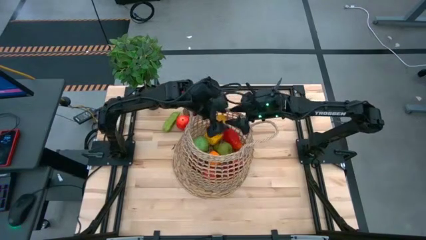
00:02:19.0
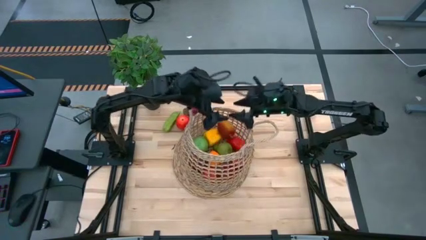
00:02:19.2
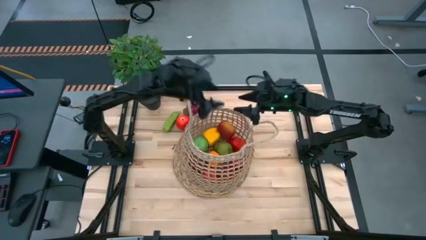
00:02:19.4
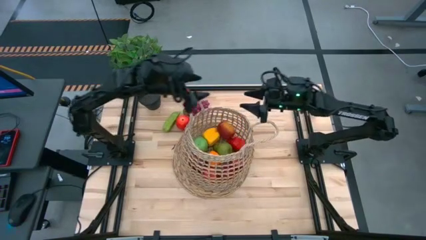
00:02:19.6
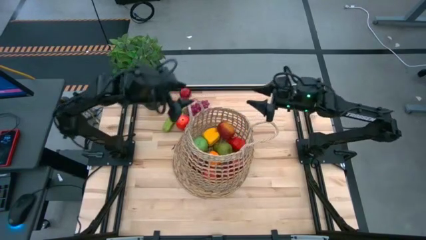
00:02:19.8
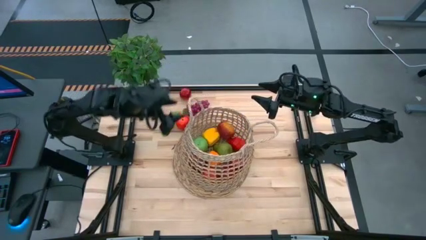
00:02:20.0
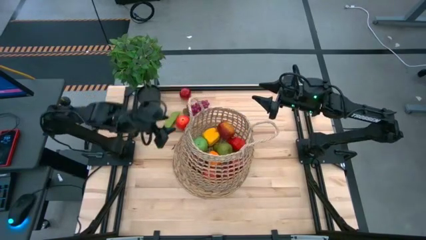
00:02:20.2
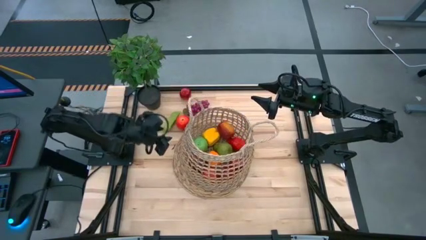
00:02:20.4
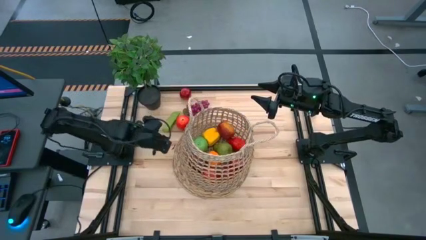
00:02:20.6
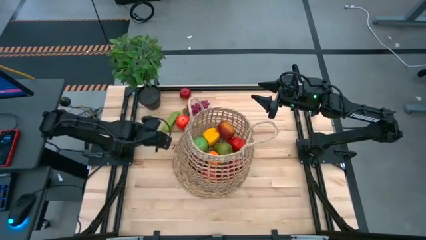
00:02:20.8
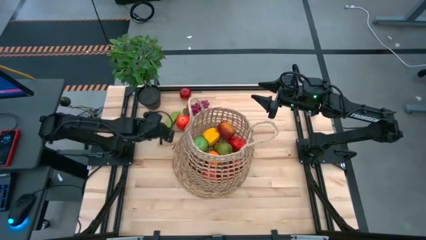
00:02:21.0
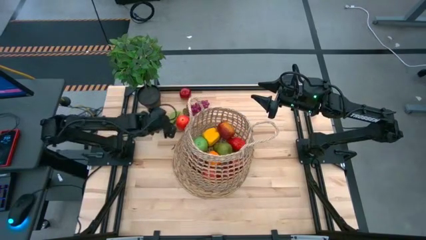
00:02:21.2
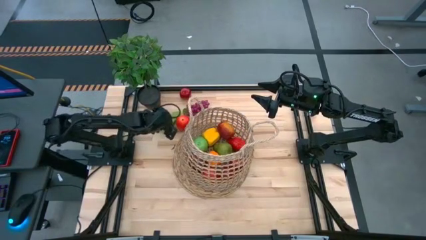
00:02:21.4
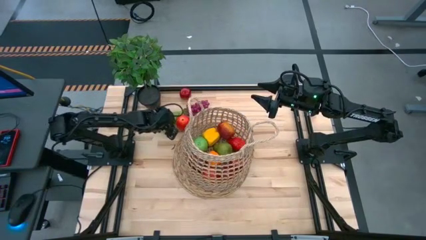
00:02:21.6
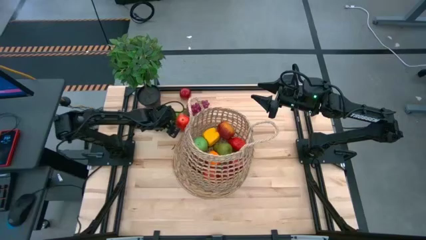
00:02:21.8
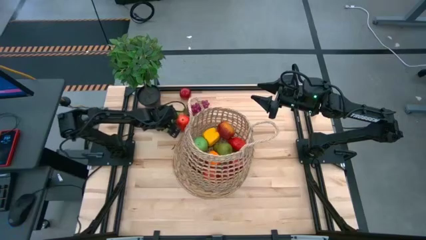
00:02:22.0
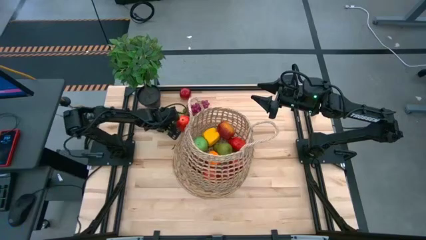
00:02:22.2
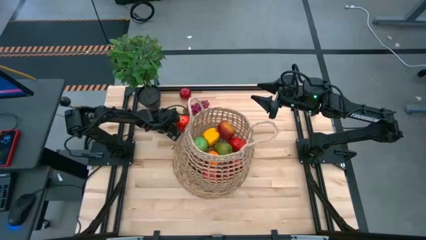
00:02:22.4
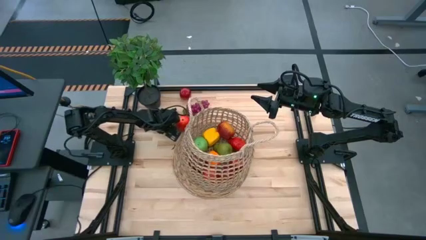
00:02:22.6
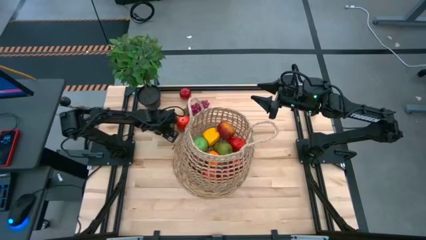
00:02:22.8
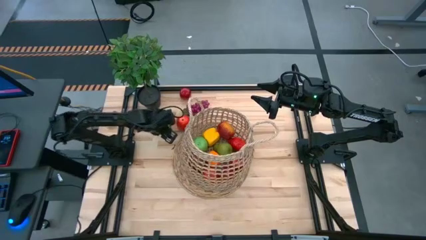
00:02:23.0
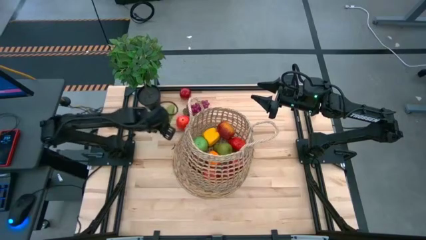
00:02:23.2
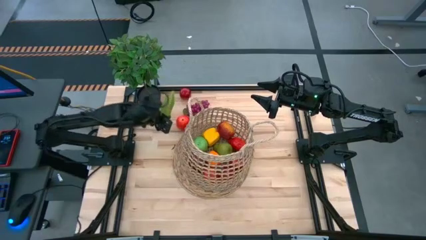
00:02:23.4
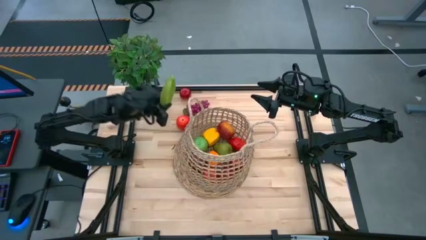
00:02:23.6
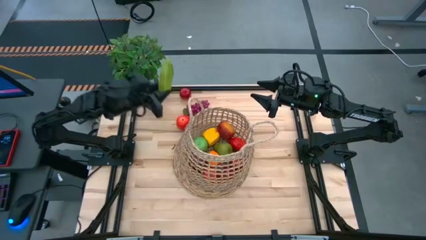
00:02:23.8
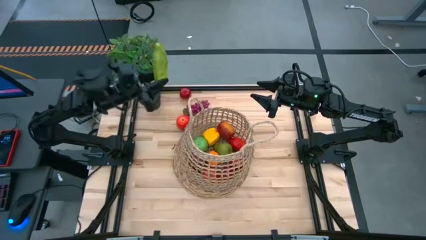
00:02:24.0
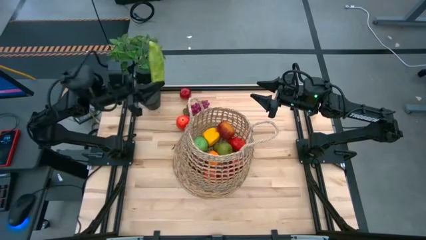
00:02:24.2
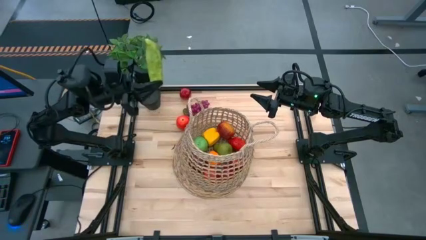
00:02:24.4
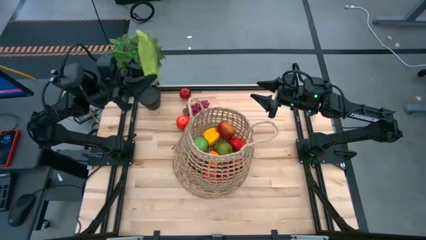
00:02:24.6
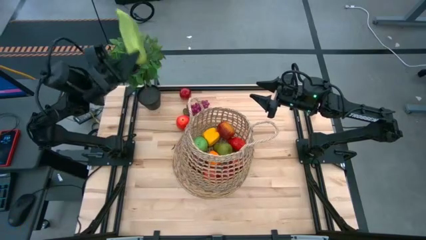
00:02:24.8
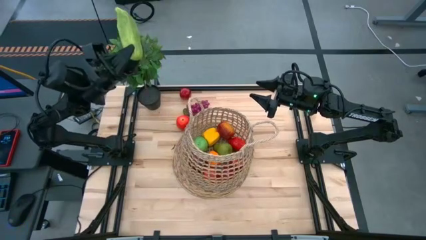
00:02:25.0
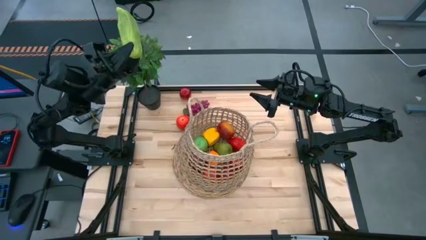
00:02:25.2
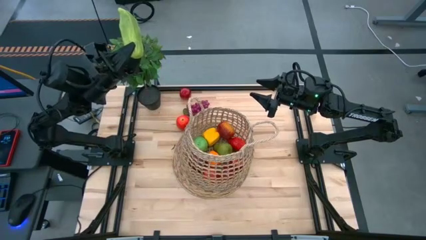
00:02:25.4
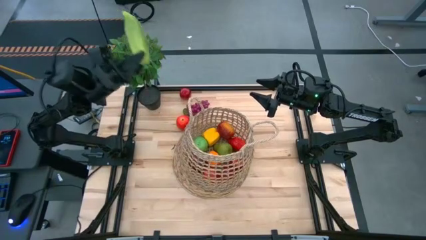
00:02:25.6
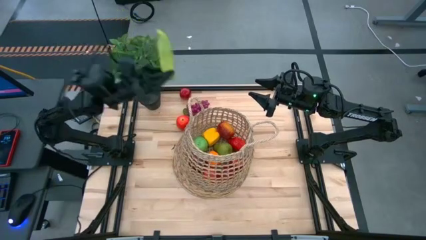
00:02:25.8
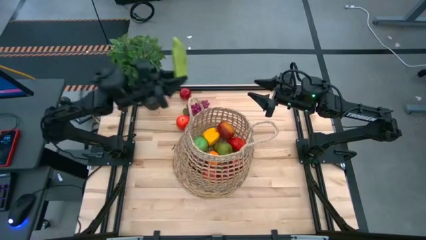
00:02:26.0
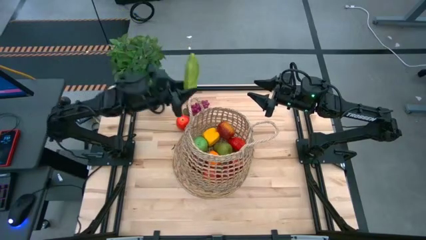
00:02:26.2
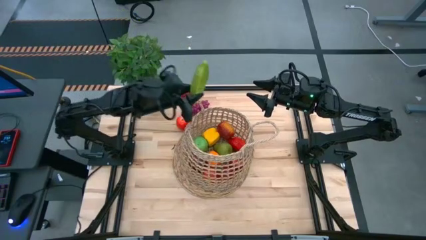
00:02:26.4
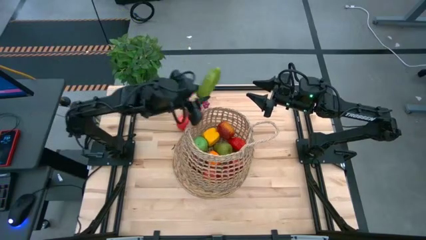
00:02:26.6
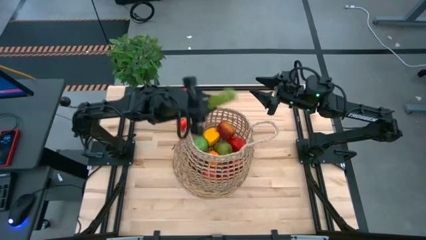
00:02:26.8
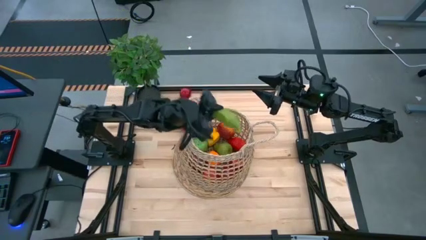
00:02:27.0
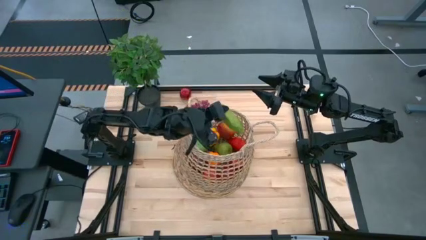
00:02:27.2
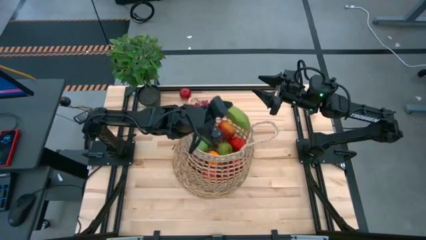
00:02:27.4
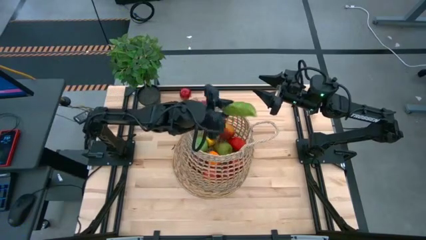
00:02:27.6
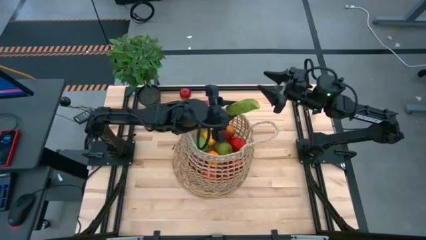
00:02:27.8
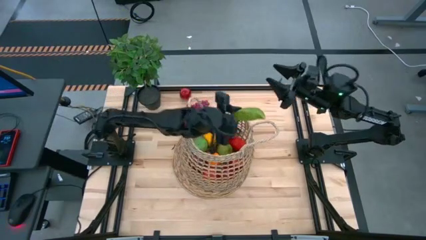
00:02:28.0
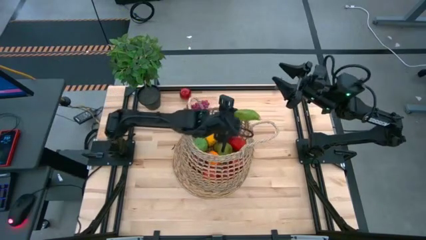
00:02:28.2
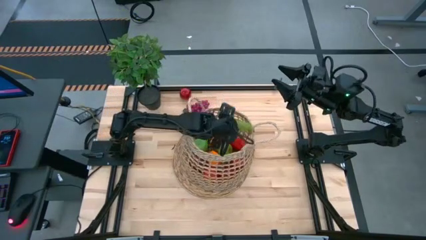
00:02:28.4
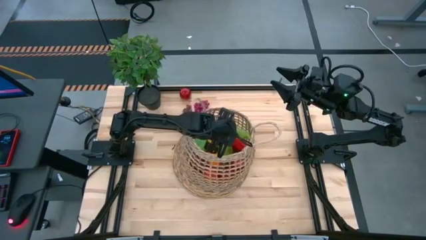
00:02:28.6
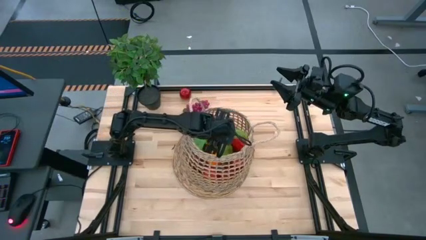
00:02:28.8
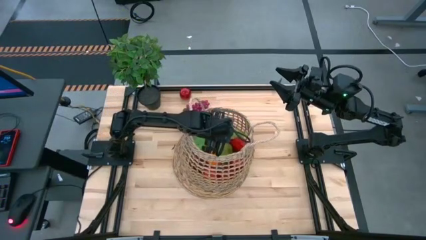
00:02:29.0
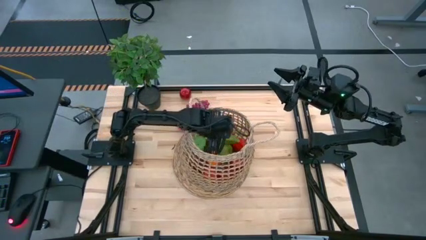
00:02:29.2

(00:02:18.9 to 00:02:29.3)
Task: Build produce basket
Put the green cucumber into the brown basket

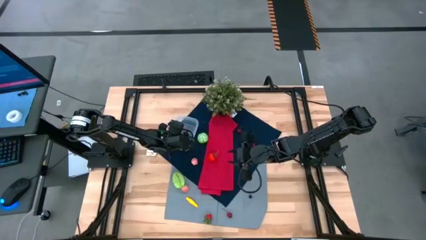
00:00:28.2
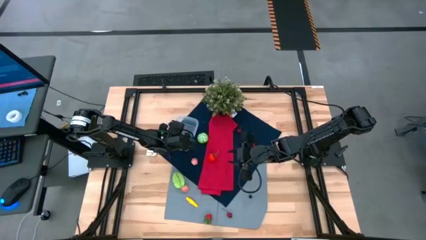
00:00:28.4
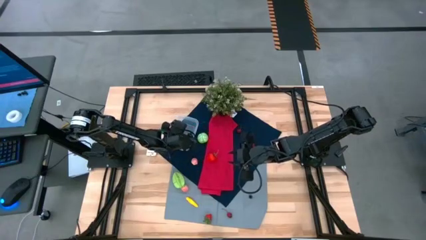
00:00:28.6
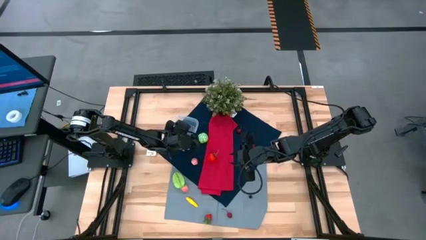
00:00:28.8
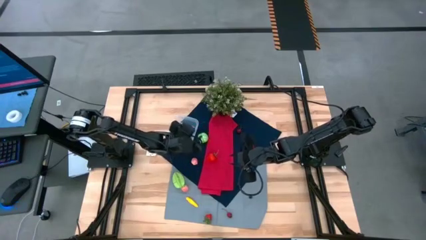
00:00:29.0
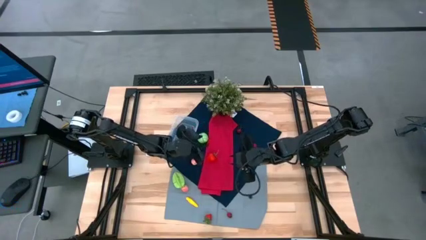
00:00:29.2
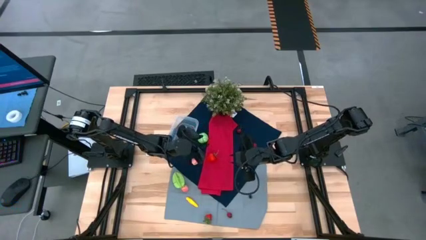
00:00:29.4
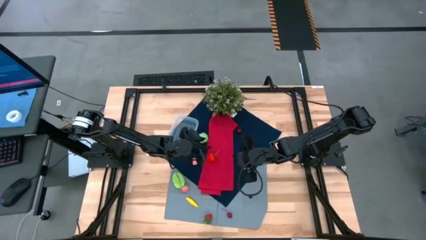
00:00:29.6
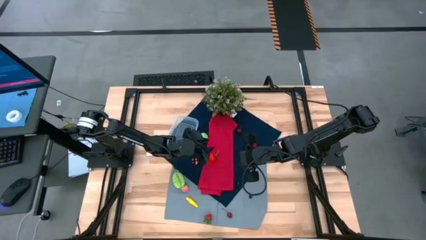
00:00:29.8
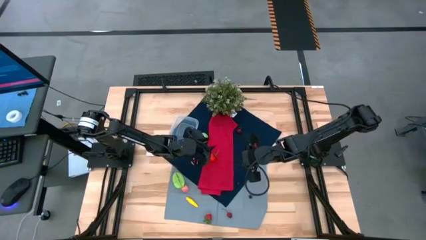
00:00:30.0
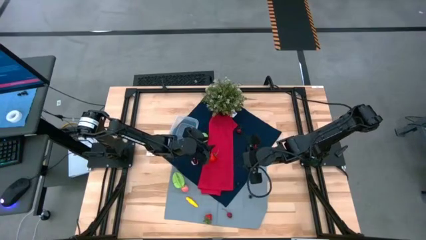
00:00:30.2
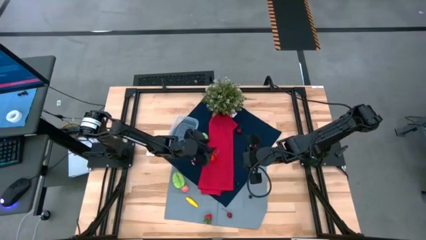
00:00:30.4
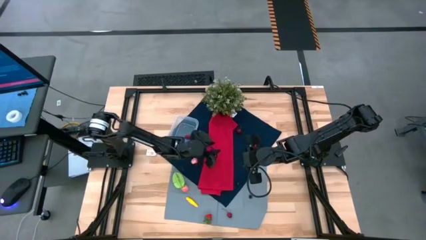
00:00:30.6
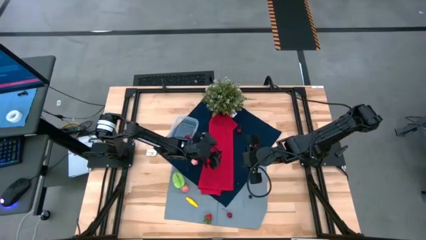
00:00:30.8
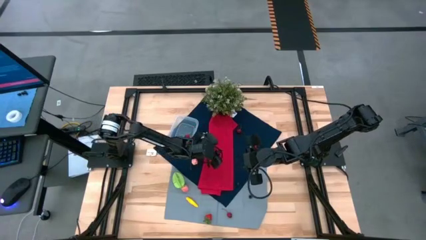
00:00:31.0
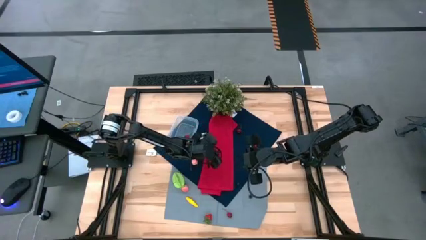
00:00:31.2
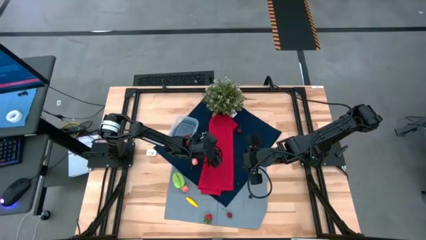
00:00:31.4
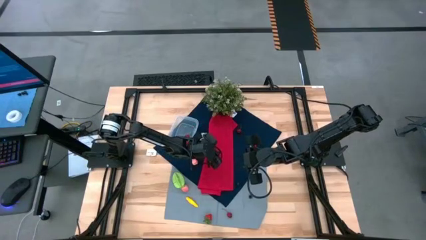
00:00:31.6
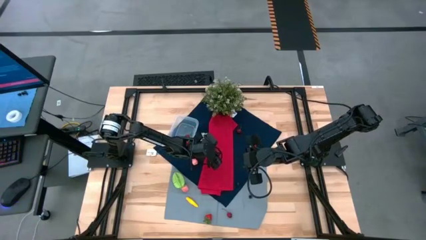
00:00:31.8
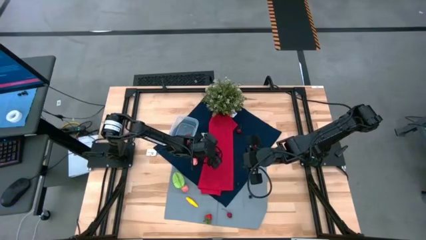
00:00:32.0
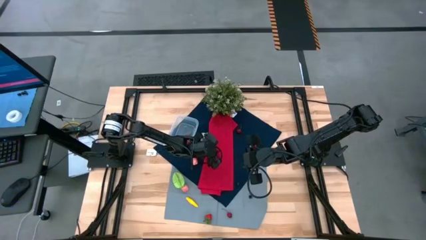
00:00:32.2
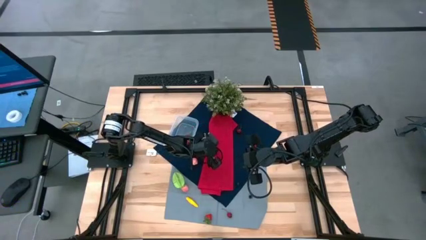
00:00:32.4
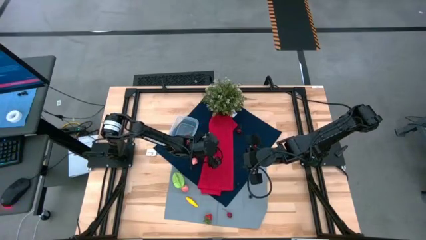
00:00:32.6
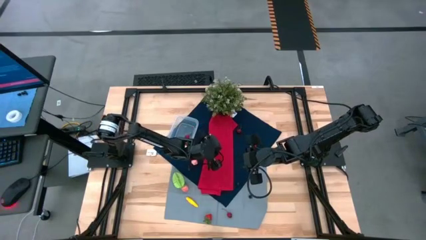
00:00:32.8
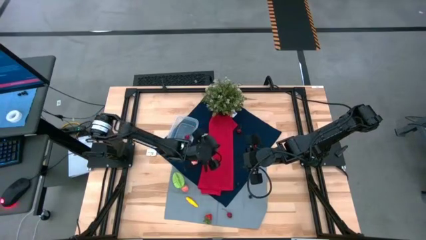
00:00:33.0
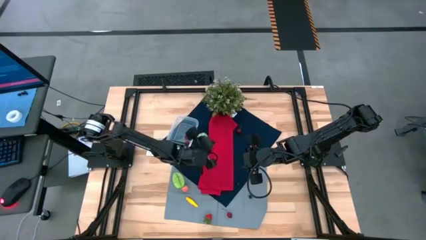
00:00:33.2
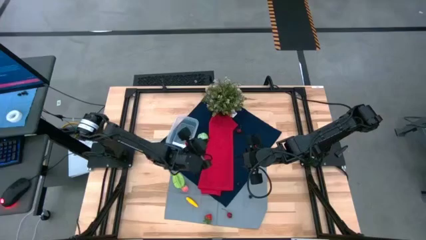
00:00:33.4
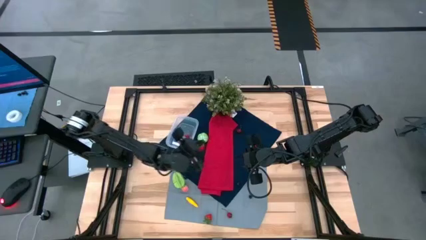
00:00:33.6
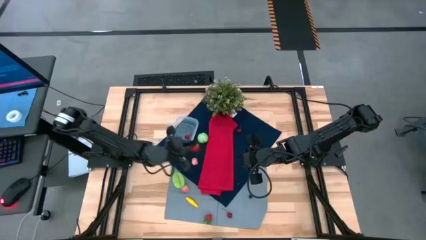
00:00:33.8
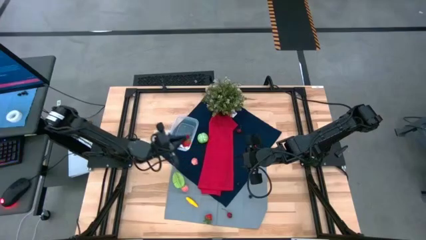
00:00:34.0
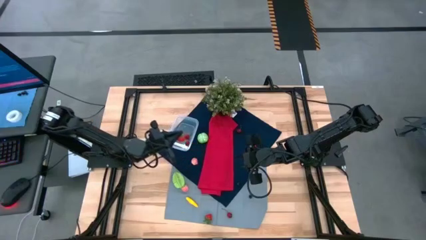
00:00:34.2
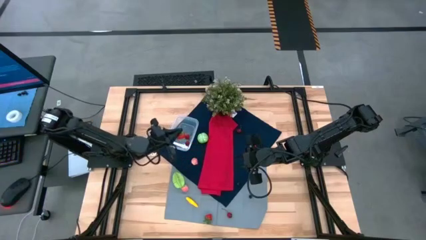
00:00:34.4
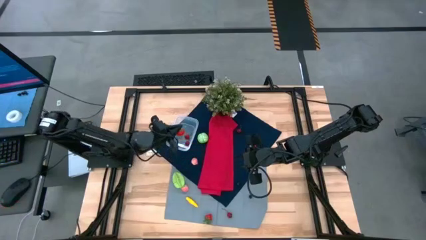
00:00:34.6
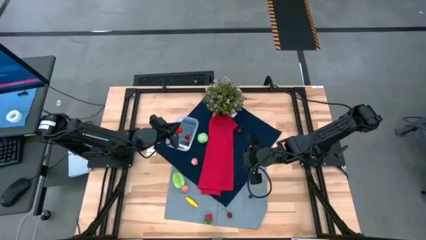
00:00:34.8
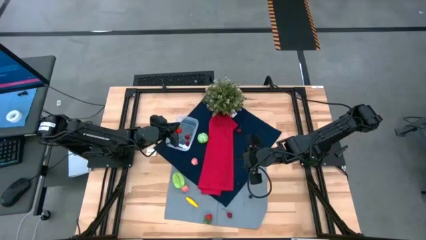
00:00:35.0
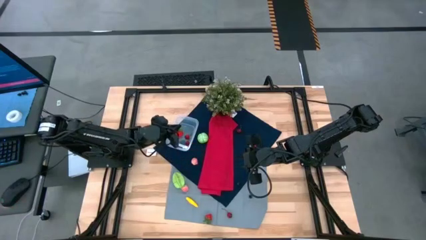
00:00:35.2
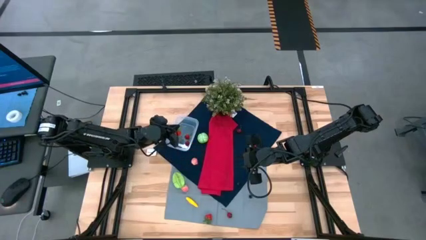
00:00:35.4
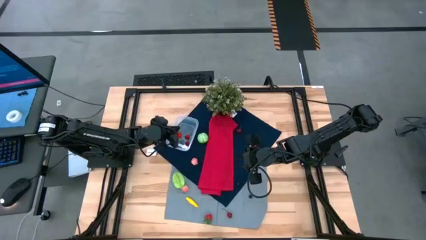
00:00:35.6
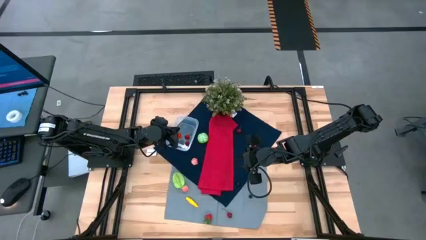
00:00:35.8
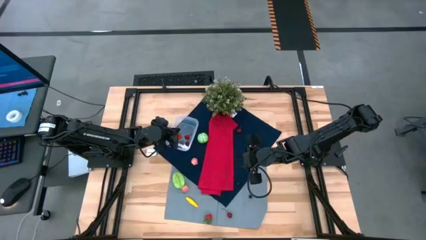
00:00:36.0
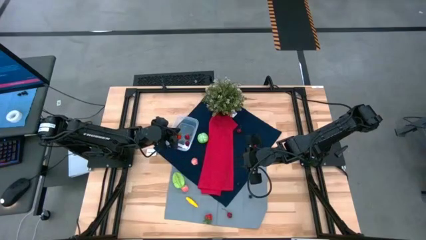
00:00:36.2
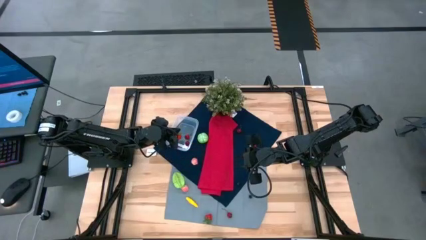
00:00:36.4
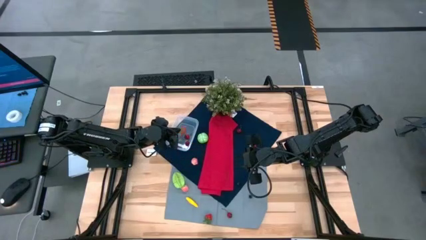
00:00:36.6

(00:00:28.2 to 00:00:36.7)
Task: Pick and placing Produce into tupperware
Put the top red strawberry into the transparent bin
